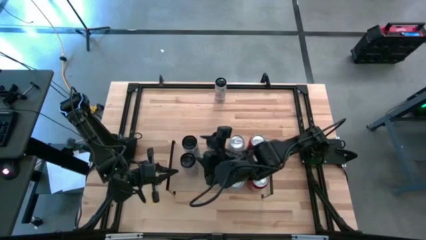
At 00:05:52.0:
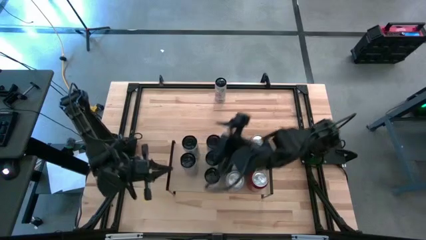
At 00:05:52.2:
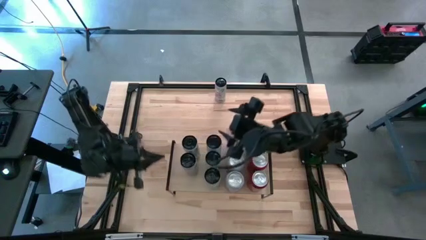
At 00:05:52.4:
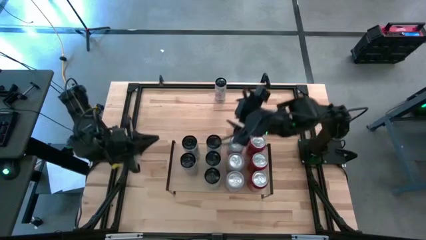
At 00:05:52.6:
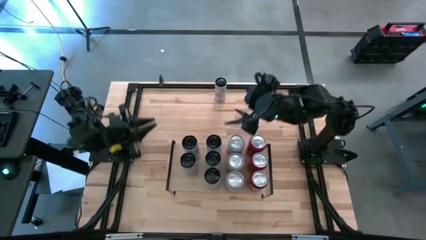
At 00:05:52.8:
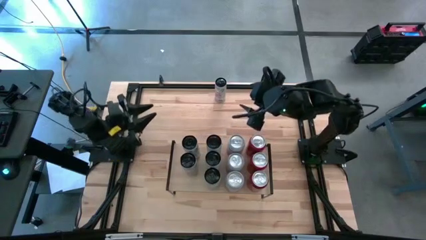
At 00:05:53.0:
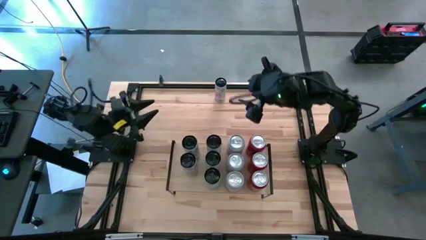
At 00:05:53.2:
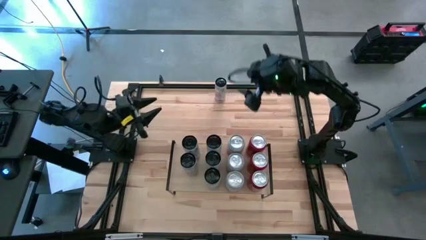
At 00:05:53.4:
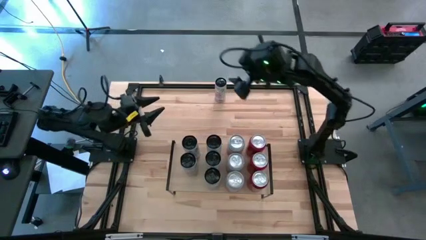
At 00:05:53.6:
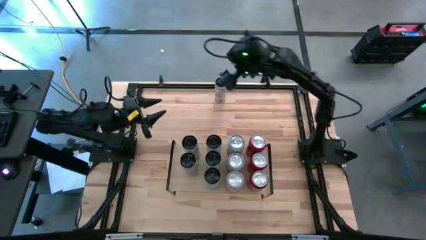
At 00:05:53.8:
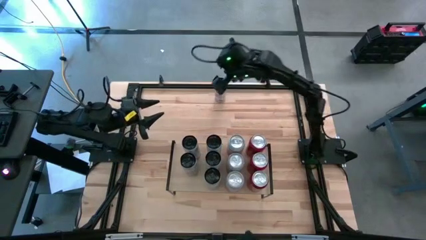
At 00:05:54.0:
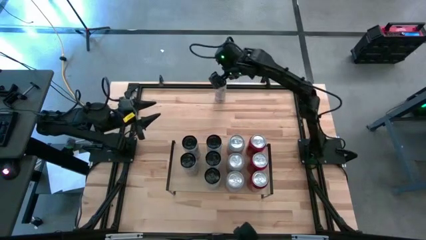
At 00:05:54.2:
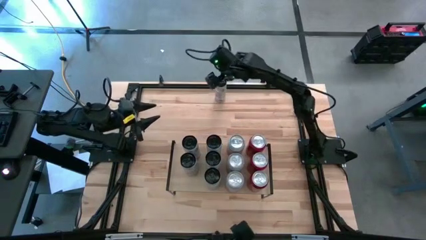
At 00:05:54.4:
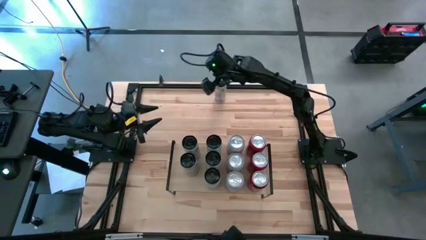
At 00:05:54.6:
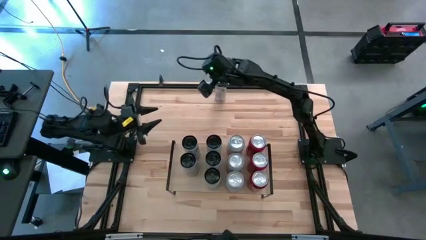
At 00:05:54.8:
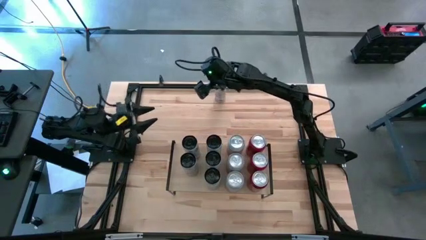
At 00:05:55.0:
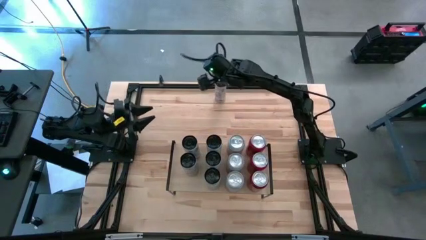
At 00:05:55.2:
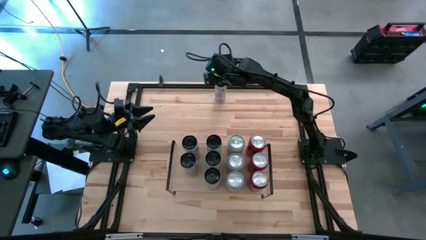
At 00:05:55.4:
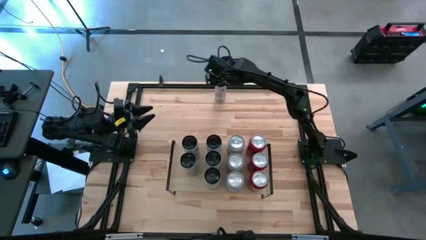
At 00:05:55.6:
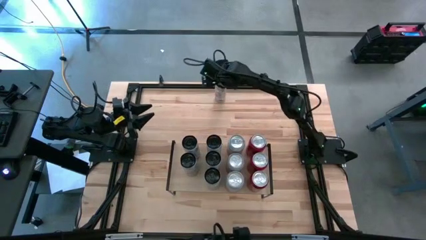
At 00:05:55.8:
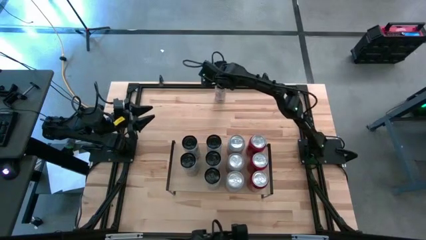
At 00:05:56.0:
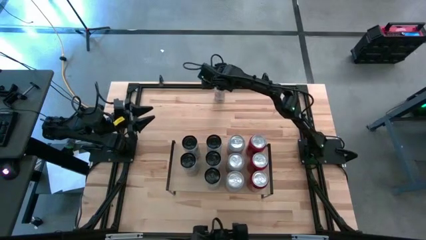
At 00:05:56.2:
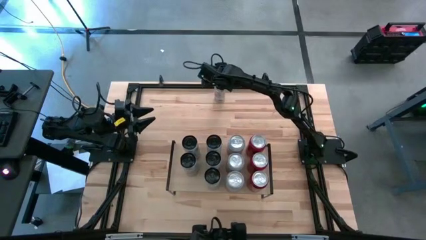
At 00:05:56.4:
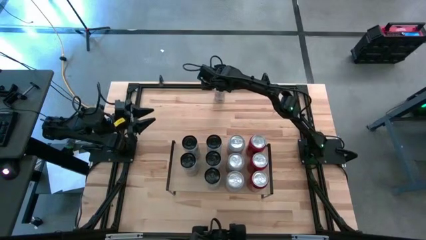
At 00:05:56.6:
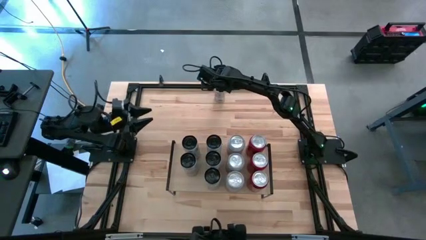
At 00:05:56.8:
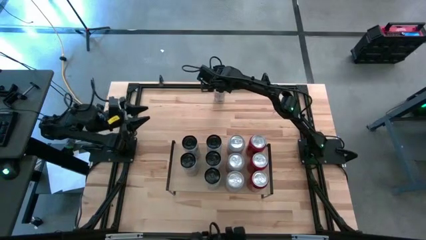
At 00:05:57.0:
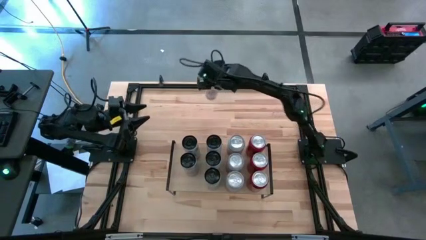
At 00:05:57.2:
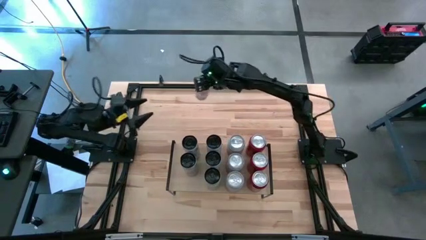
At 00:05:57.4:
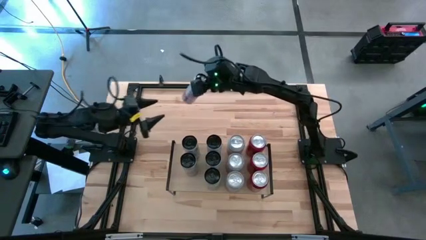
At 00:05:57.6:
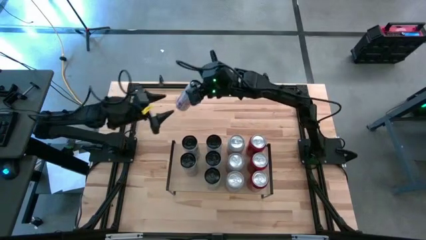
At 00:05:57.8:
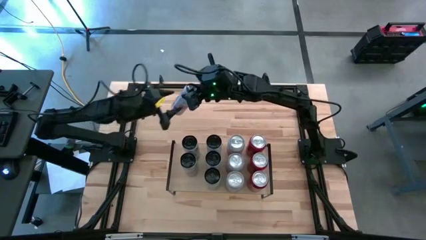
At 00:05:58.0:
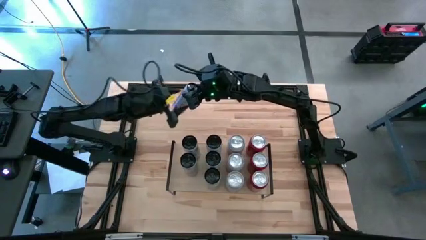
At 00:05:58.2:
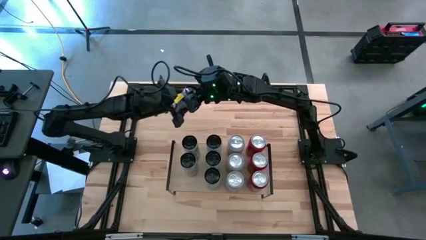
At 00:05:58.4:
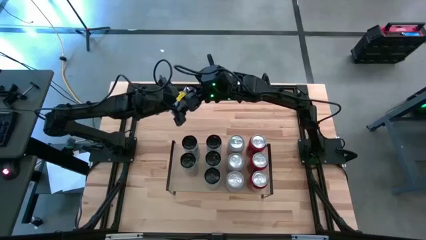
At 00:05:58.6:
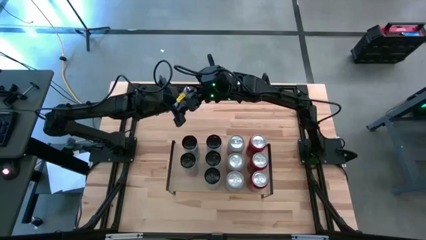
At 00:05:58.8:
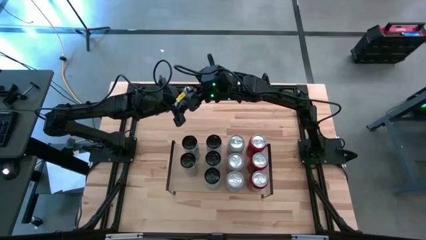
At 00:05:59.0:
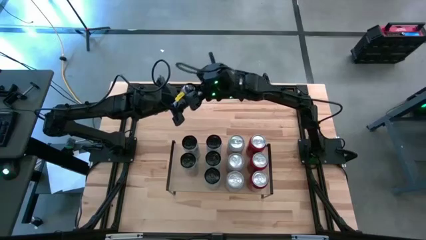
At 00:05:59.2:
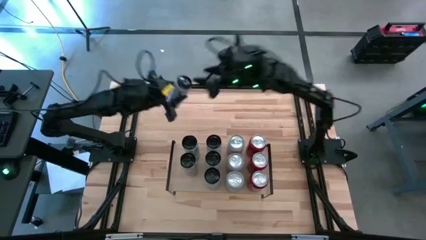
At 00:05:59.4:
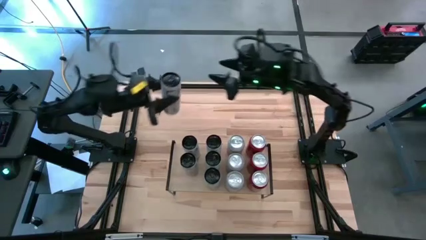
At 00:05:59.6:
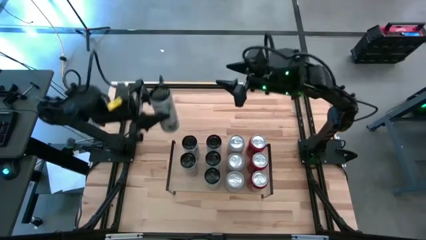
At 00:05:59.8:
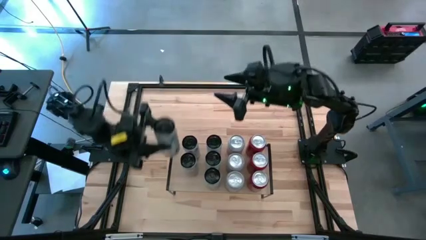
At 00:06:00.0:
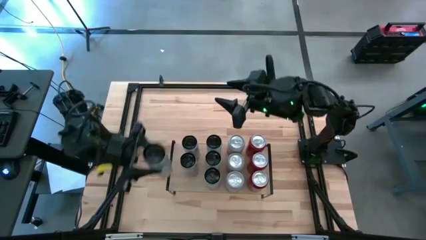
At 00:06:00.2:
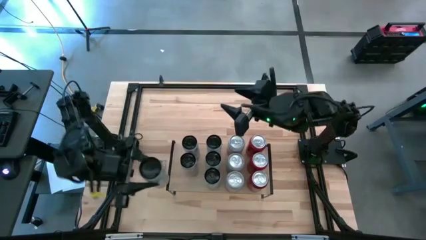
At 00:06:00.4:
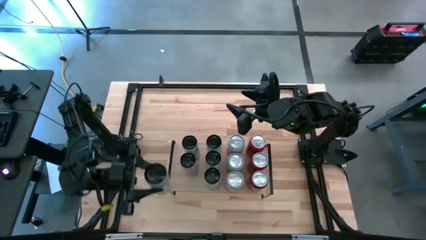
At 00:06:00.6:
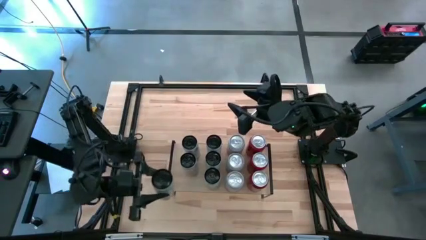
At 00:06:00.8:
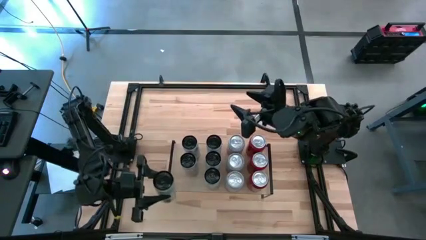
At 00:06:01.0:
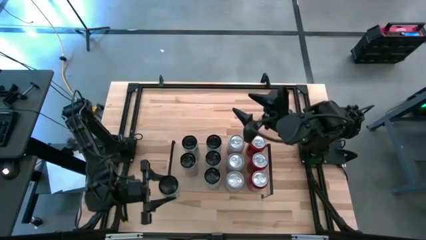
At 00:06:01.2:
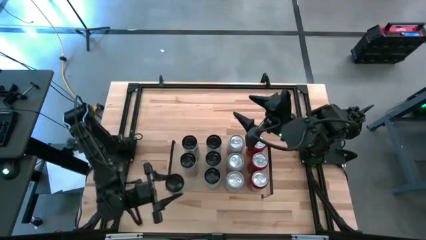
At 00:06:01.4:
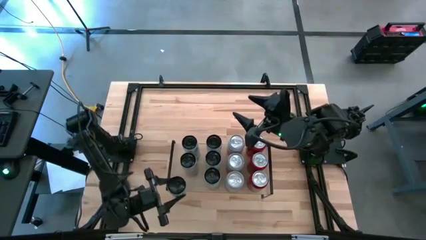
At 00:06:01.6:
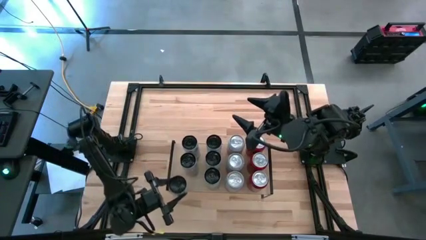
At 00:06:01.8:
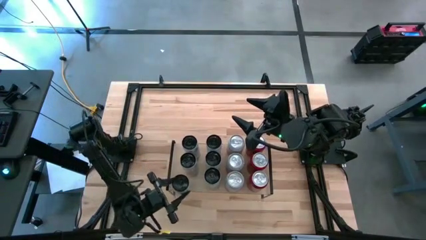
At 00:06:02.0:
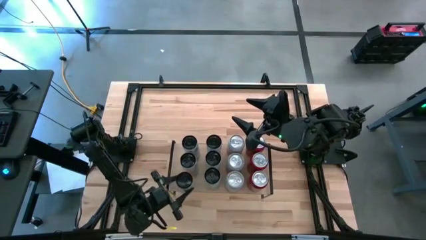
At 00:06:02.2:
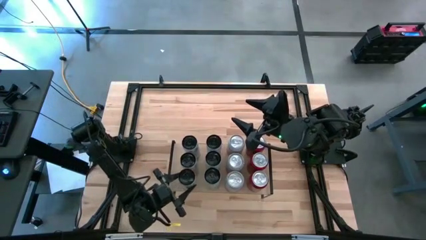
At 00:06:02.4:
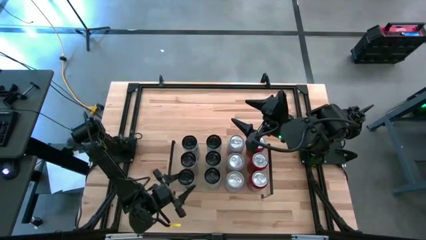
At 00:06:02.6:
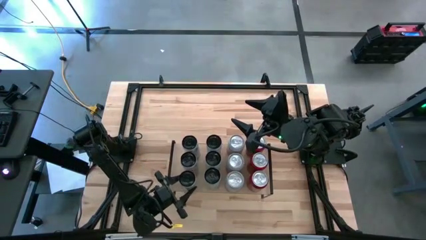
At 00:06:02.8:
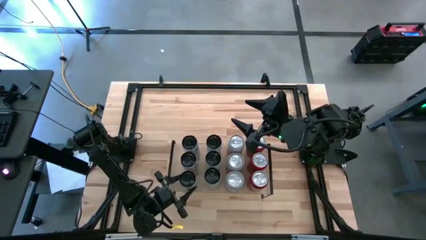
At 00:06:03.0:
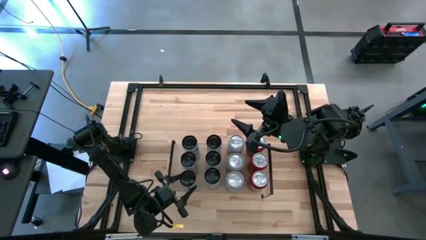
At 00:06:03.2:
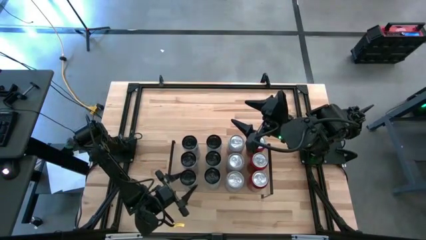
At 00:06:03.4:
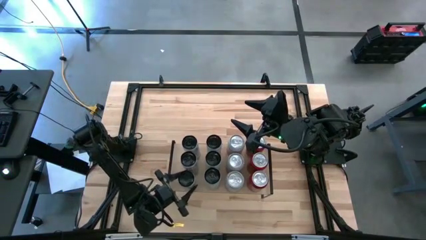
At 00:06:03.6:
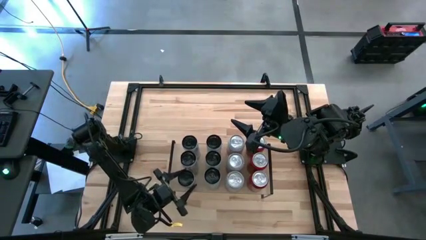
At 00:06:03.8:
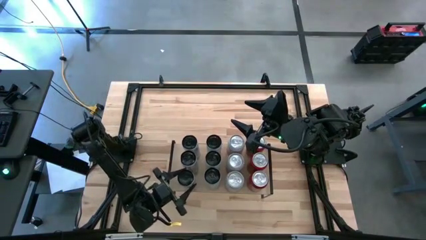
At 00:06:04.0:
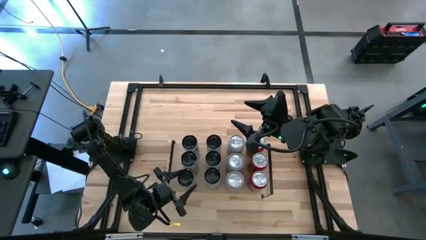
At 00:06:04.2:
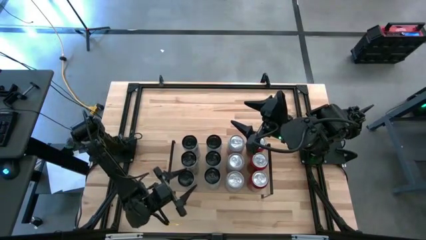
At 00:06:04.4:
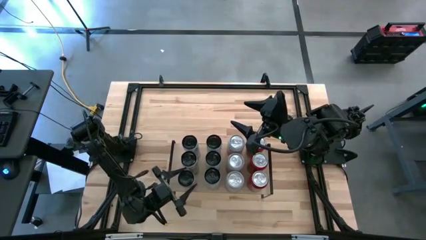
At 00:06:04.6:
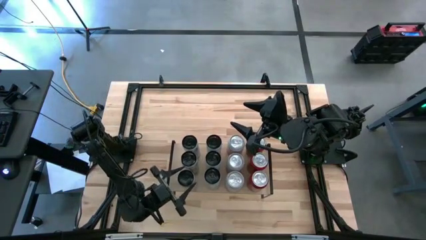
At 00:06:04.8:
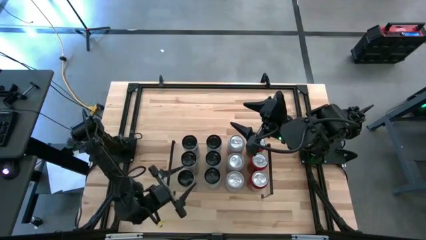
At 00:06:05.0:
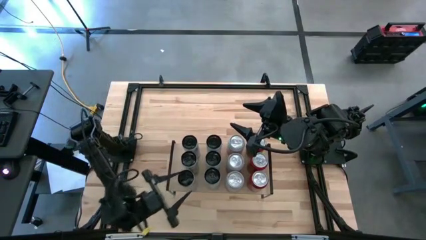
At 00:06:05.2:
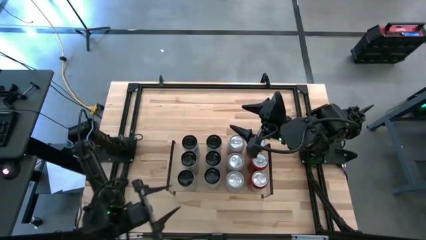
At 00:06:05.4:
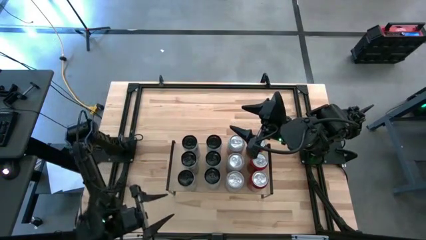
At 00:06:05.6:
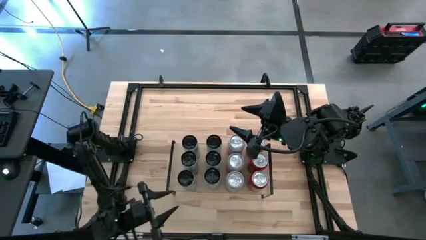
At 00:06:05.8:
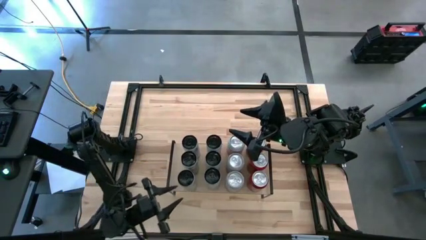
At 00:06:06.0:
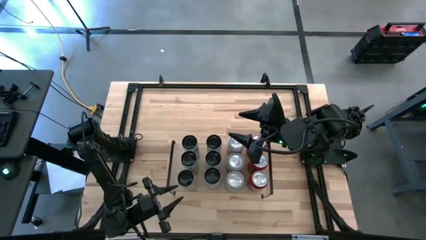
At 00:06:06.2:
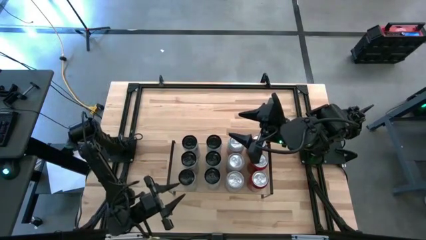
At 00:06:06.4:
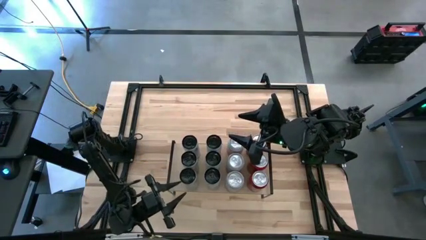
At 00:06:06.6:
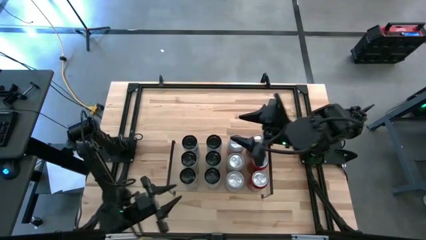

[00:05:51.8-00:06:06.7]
Task: Place canned beverage on shelf
Put the white-pink soda can on the shelf aligned with the other white-pink soda cans
